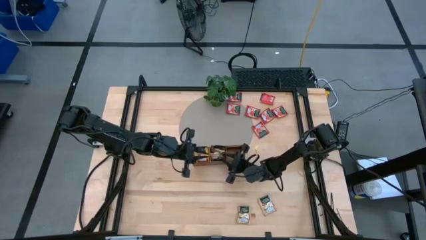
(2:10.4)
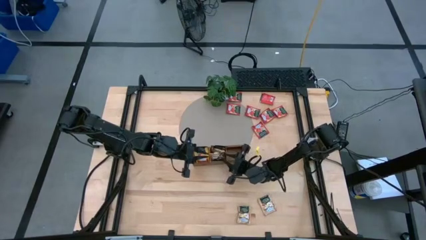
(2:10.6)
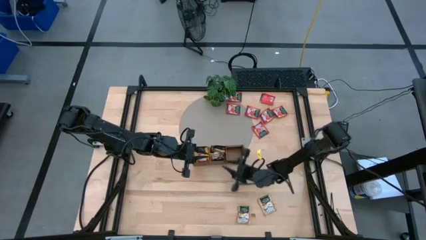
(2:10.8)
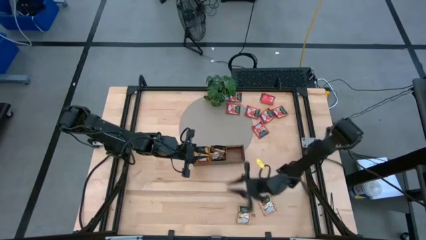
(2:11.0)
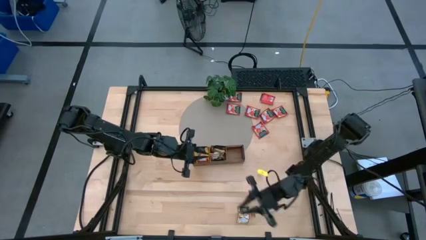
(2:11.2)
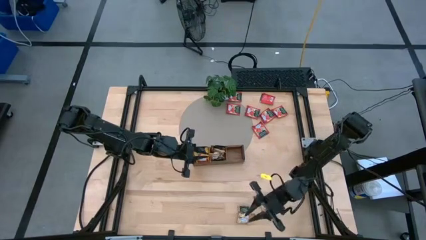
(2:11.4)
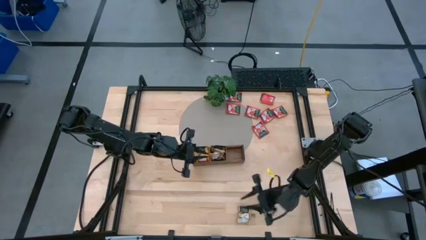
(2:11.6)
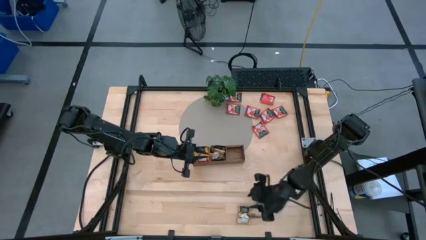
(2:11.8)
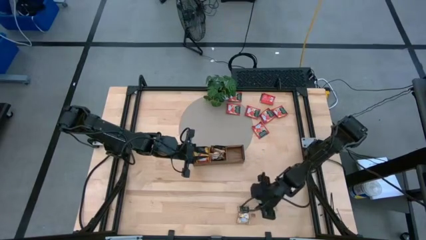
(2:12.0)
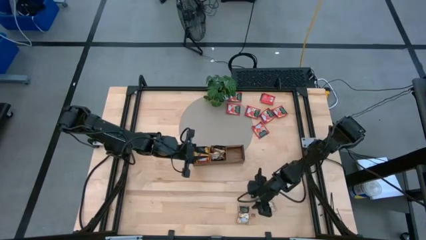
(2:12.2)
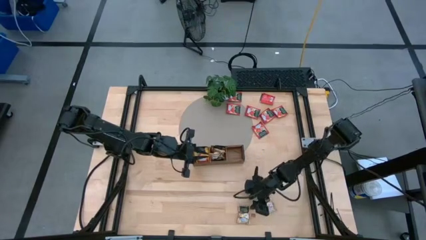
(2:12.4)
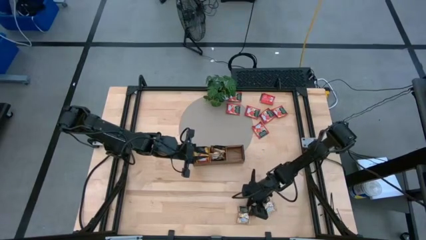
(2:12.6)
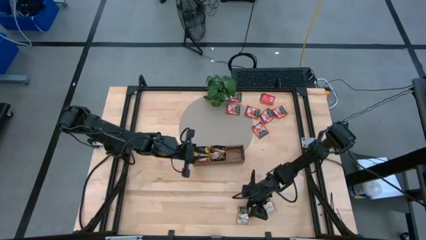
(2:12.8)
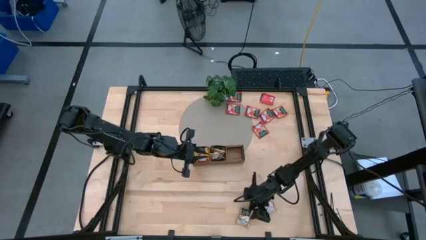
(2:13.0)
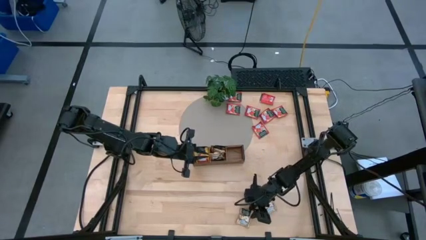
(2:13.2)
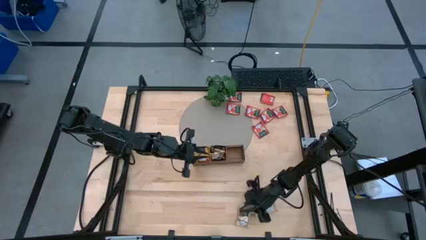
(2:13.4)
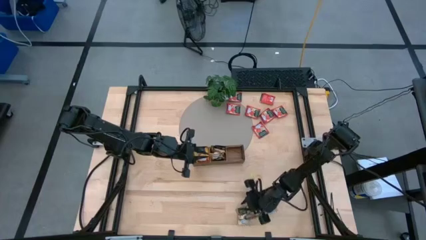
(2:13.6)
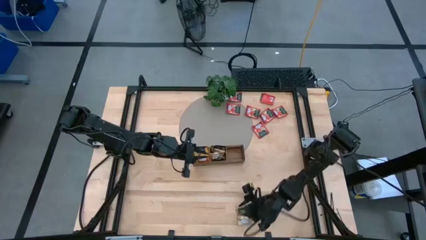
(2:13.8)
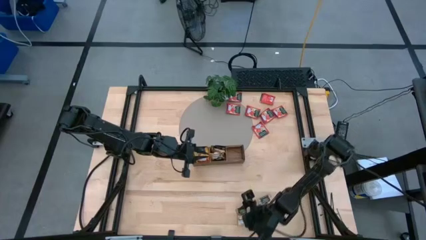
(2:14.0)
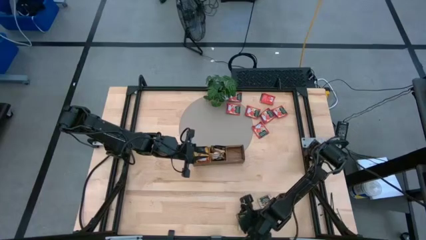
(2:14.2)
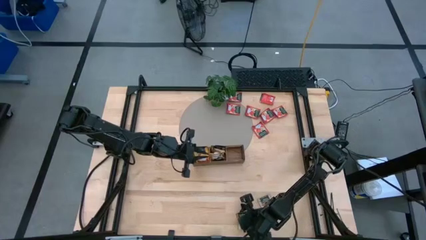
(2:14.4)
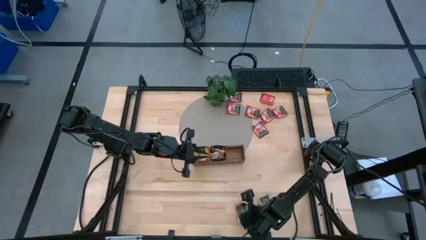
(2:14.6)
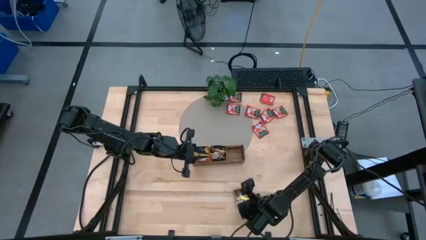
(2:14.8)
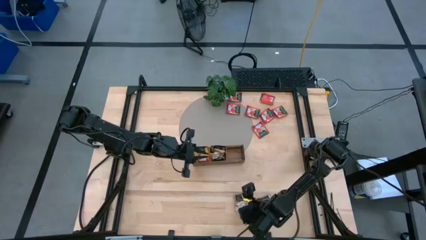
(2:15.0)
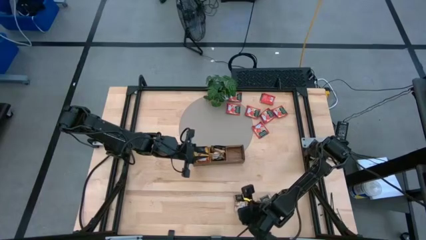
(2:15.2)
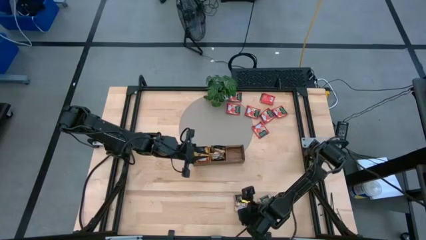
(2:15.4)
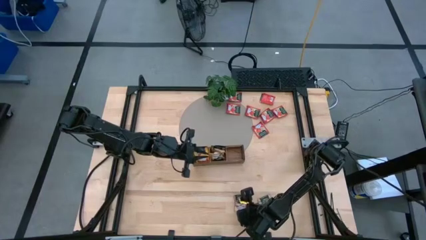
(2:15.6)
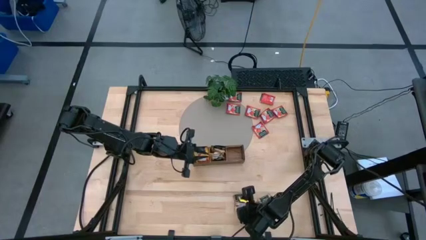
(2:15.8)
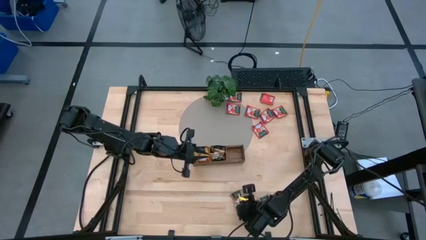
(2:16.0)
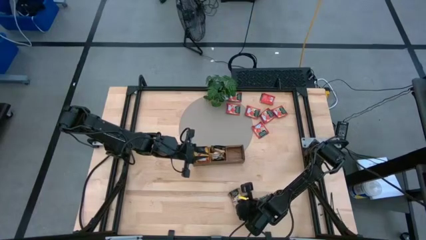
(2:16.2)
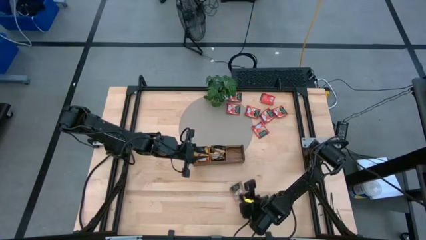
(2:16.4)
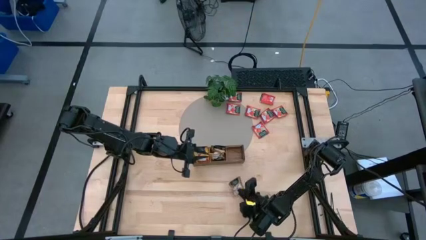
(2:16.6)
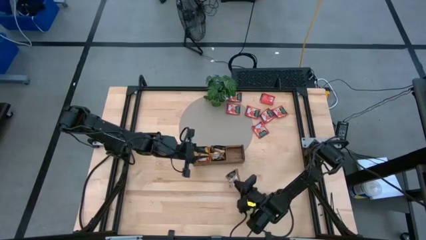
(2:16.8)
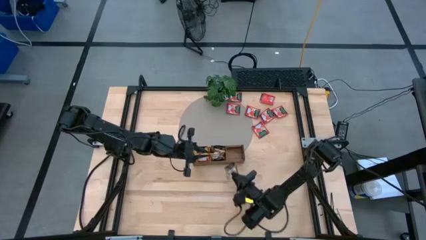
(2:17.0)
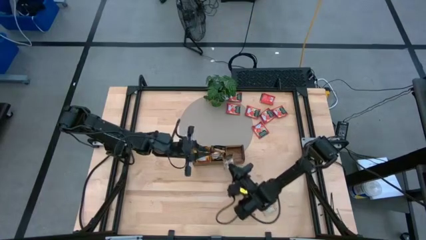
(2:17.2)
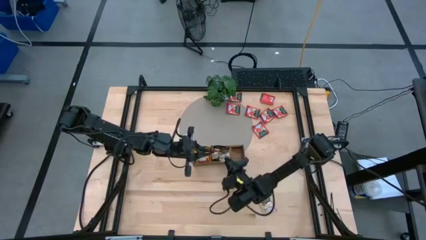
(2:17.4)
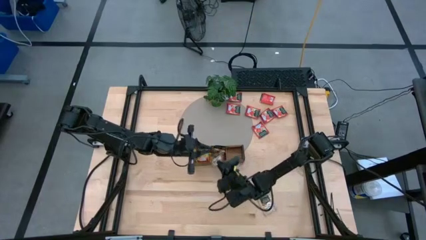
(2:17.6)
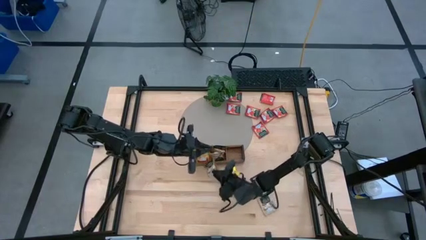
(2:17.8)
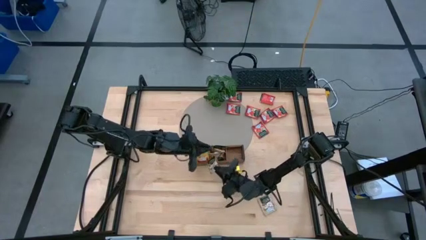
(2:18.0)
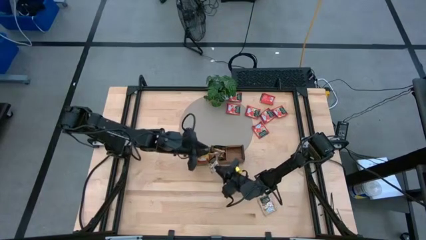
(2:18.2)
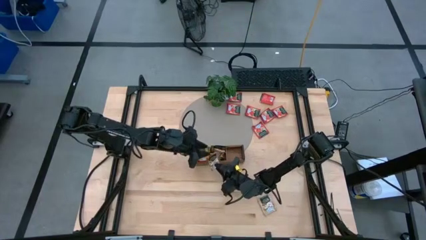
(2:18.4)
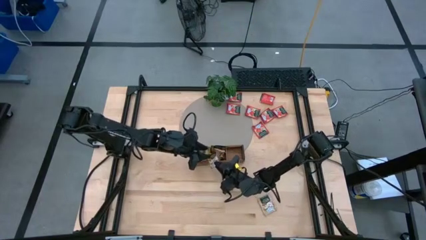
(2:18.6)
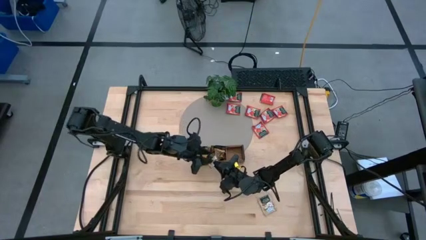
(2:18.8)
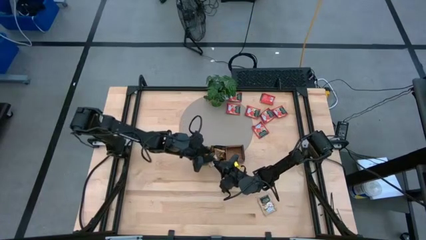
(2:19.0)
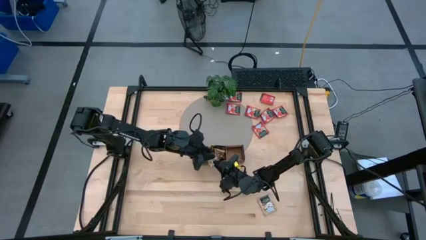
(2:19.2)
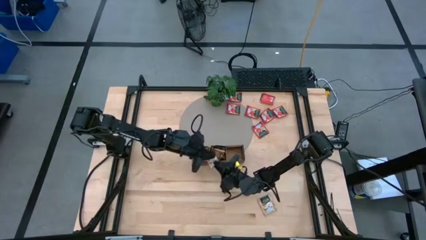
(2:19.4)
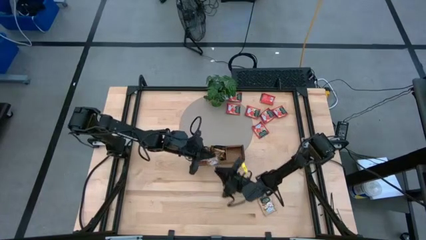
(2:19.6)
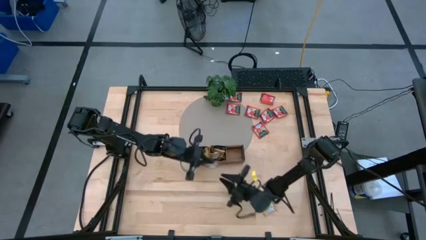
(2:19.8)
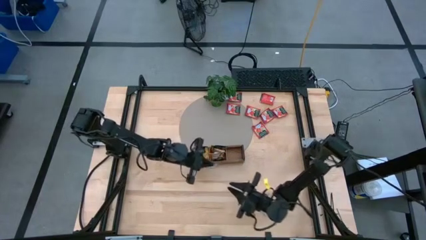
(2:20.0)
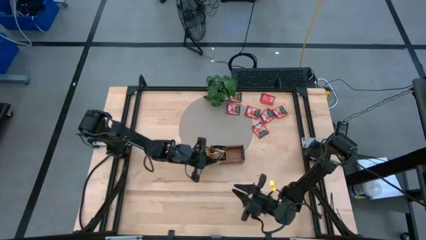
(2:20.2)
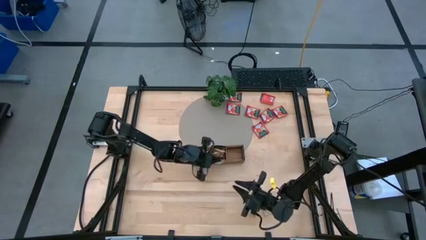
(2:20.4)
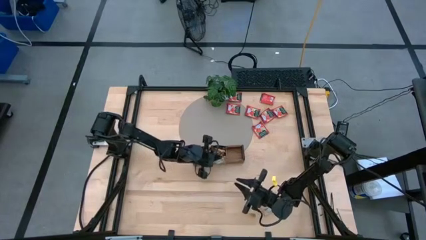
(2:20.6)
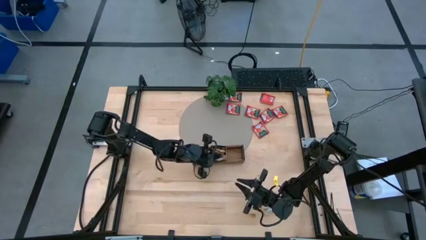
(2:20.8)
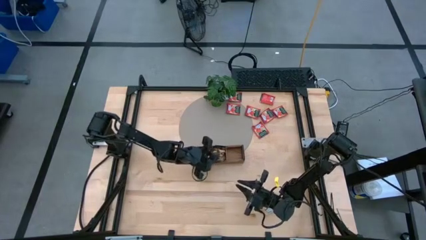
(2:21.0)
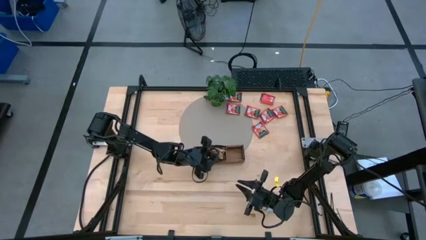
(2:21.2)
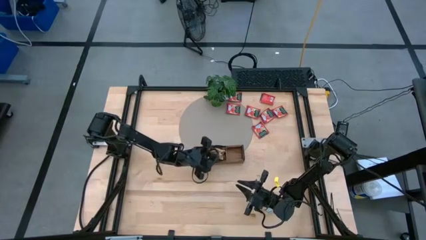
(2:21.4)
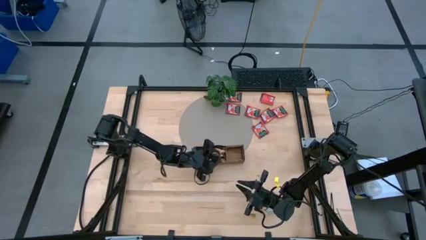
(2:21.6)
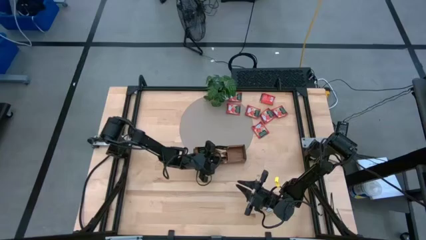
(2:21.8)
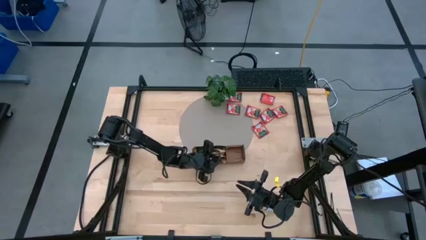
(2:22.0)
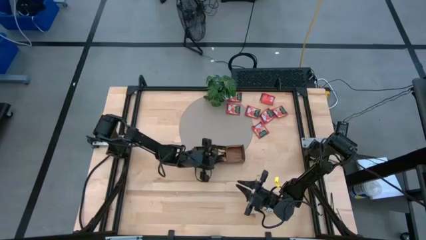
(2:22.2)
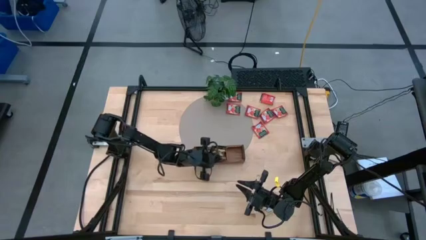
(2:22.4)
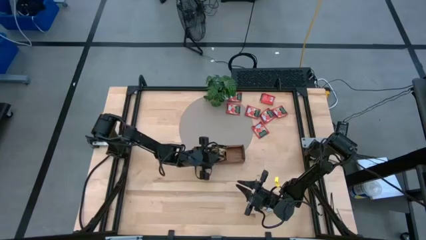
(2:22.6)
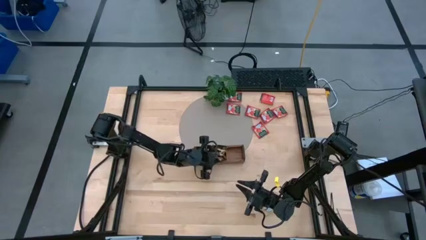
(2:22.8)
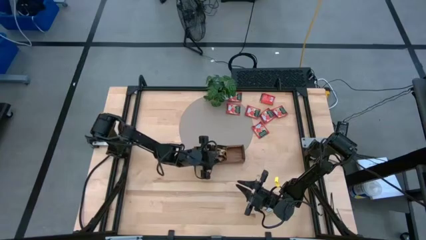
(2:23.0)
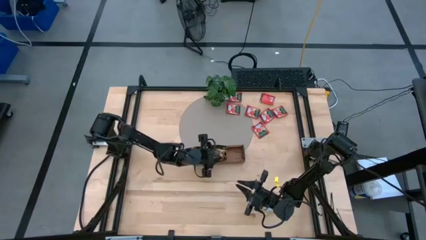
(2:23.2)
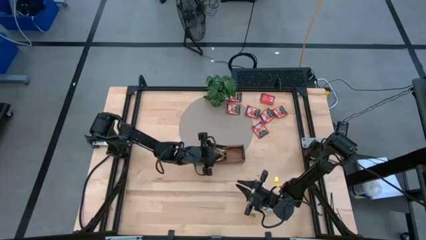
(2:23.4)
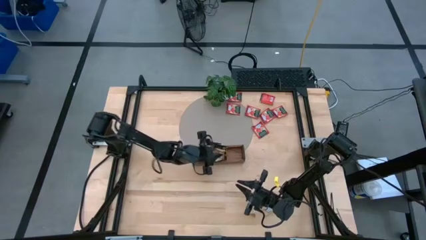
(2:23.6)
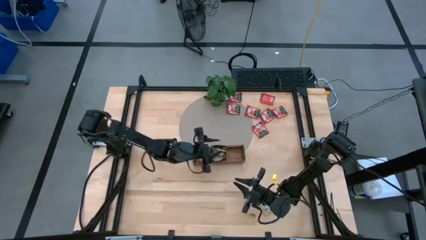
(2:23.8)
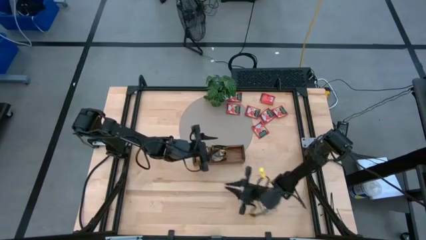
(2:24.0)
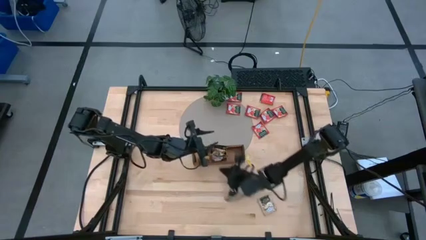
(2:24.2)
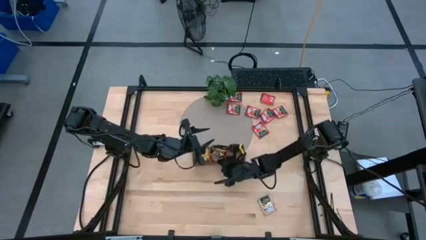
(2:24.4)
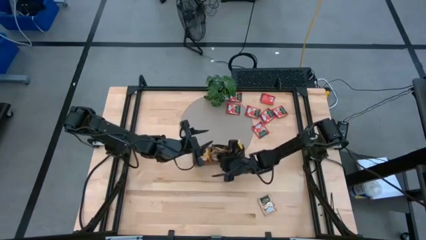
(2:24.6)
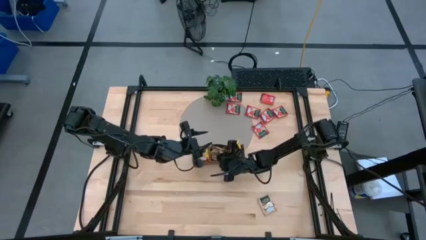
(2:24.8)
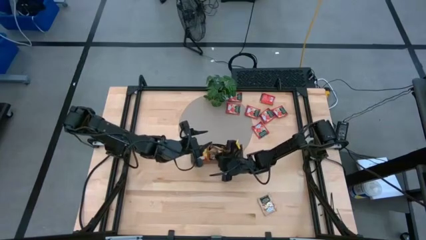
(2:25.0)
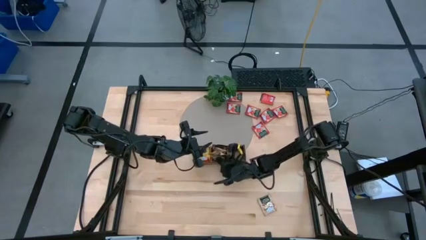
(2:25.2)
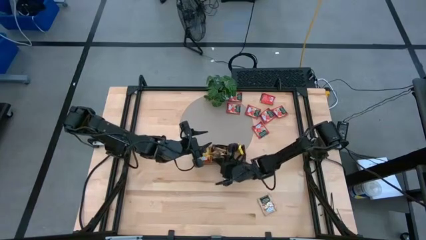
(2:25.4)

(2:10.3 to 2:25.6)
Task: Pick & Place Tea
Put the left brown tea bag into the middle slot of the wooden organizer
